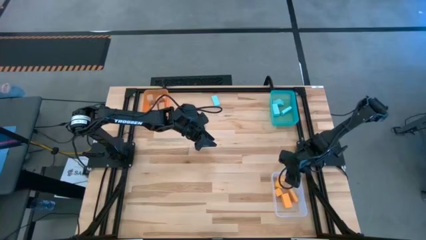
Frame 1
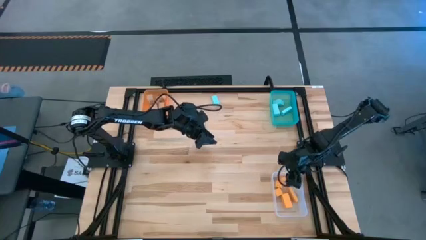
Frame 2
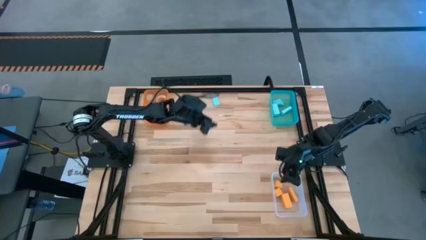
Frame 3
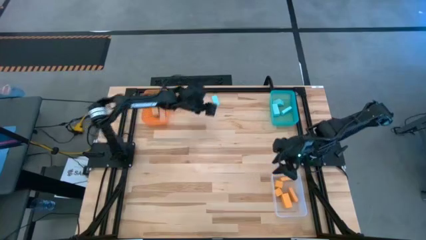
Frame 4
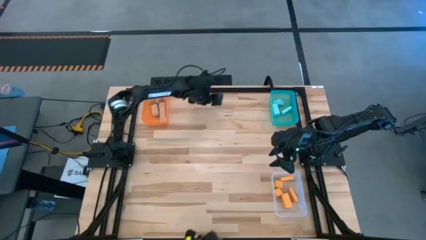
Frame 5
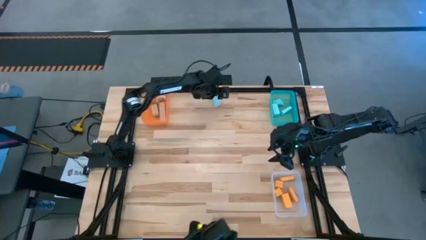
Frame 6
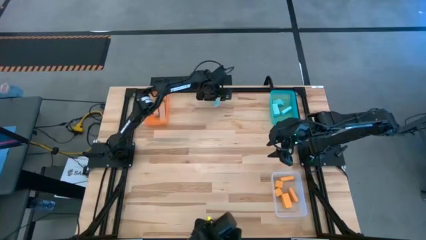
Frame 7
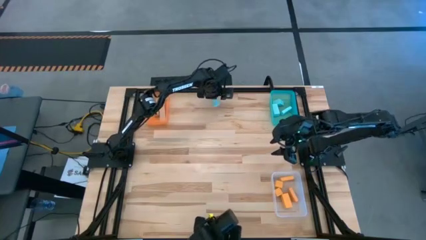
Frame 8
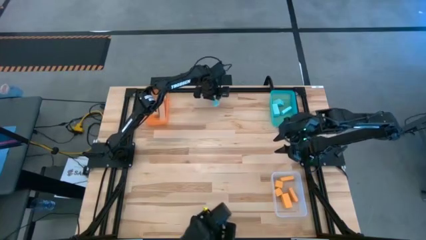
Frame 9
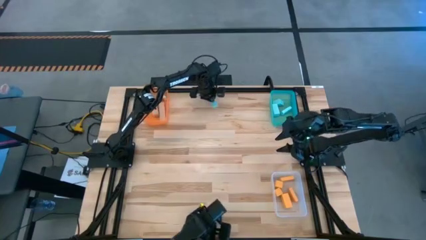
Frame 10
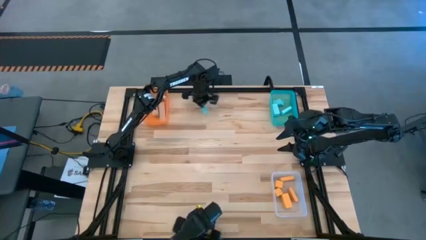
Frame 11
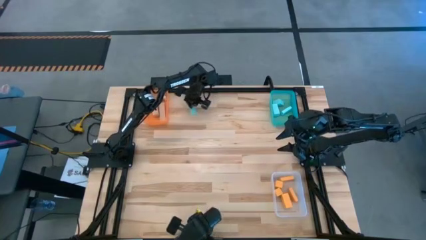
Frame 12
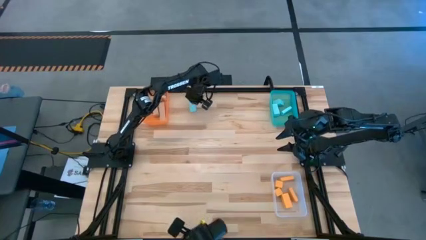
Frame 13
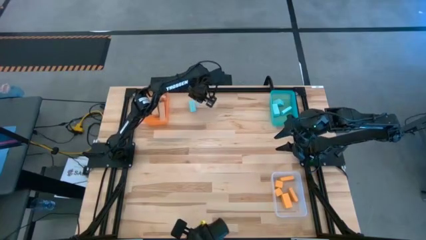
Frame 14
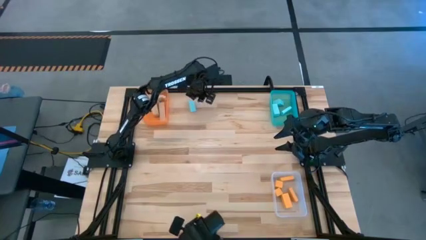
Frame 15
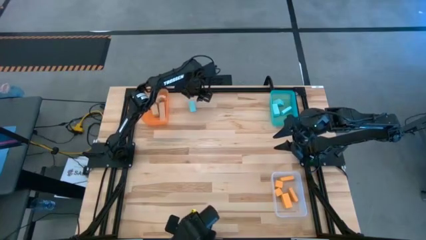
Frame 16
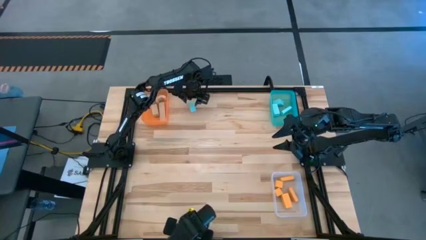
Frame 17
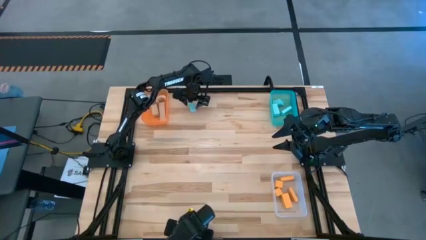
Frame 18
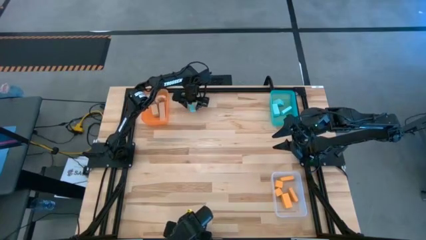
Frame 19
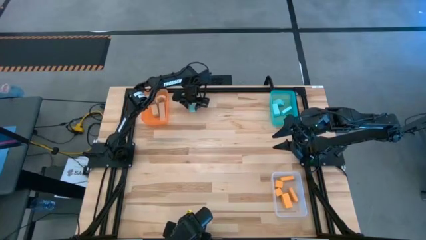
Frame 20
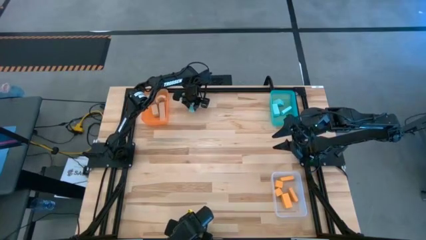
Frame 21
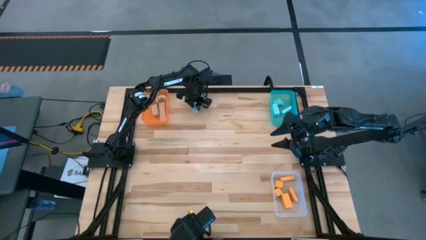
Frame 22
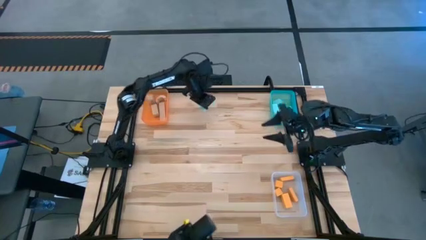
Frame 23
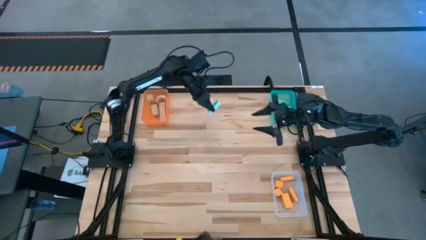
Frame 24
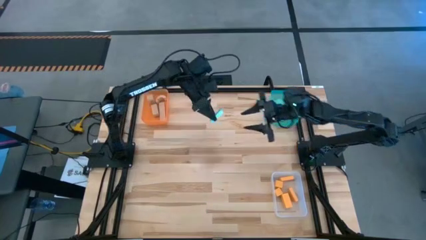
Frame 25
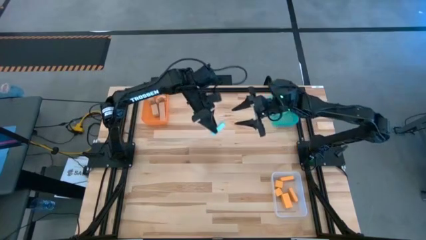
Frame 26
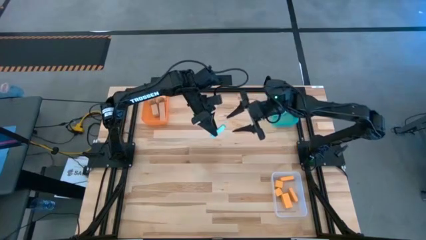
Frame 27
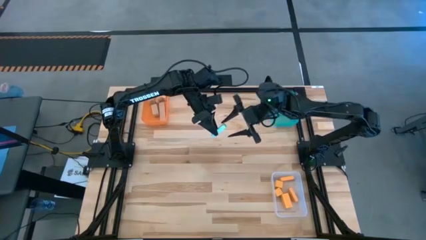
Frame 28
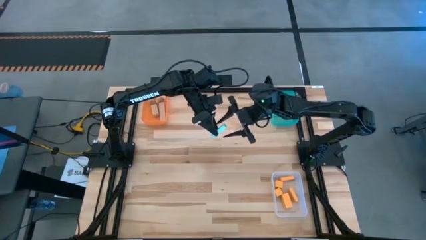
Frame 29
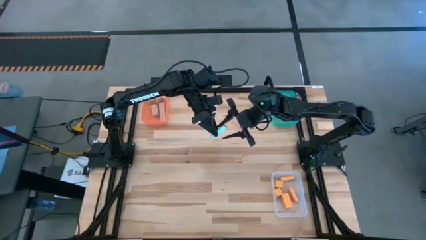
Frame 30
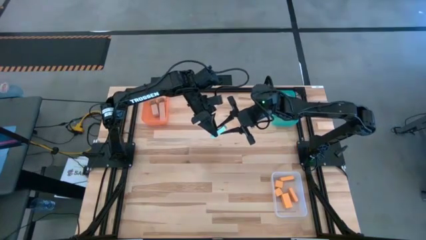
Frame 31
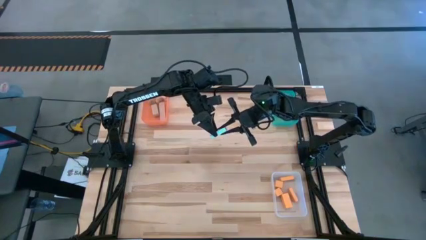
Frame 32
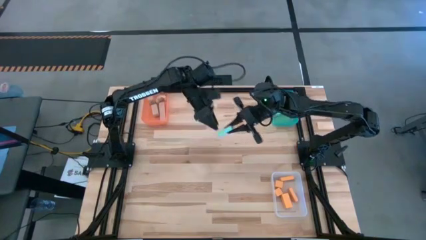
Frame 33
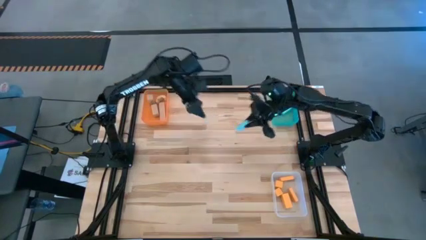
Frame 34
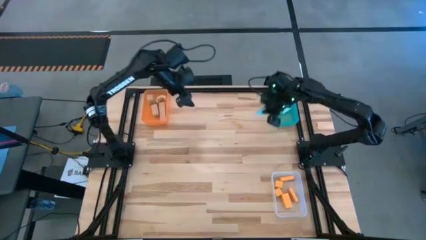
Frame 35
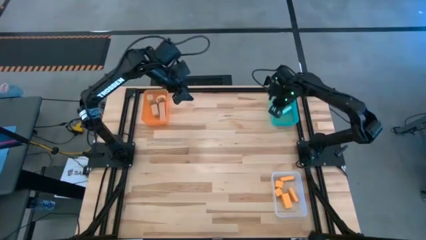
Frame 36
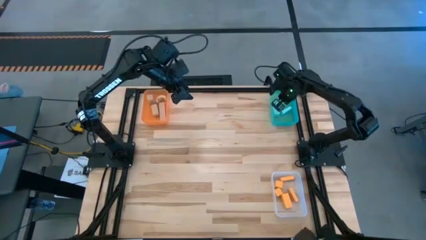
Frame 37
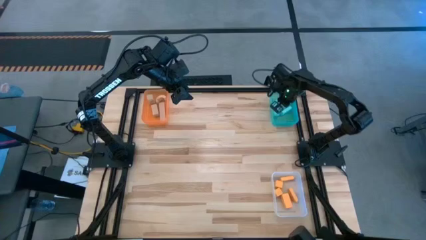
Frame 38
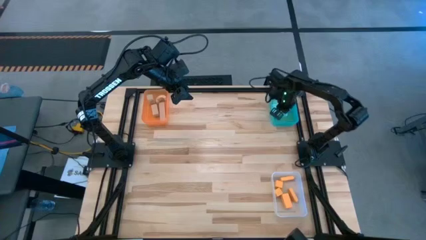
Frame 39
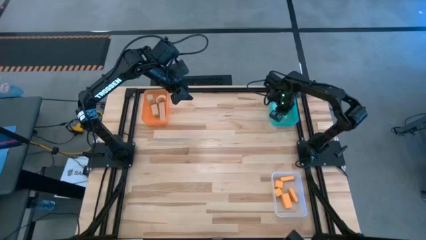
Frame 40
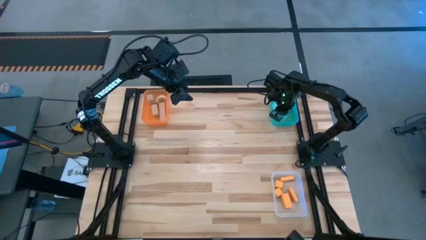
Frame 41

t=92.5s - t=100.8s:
Task: Sort & place blocks by color
Put the blue block into the blue bin

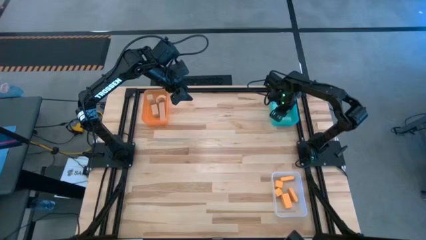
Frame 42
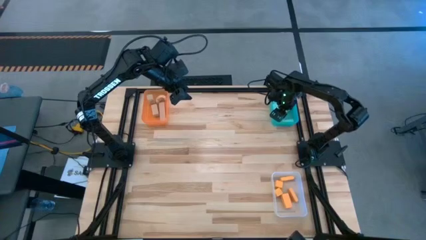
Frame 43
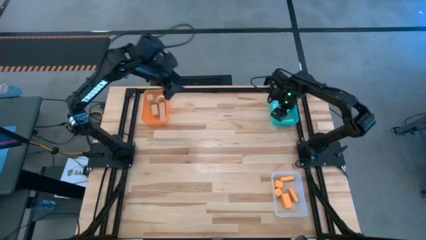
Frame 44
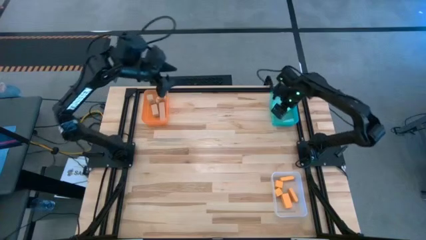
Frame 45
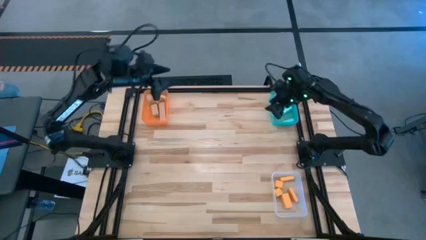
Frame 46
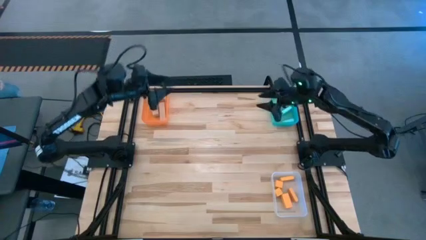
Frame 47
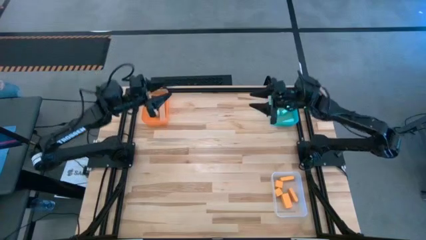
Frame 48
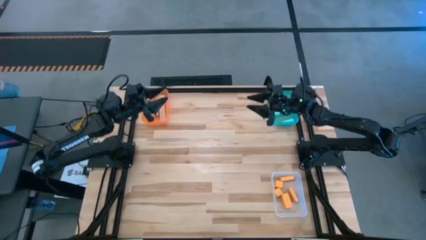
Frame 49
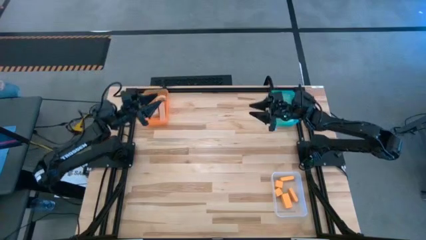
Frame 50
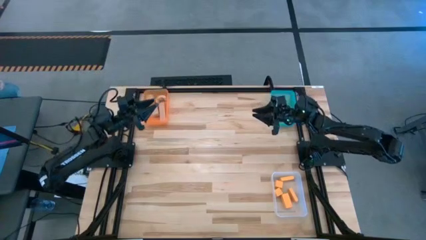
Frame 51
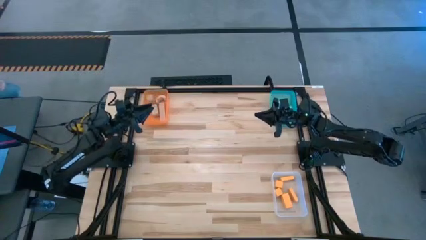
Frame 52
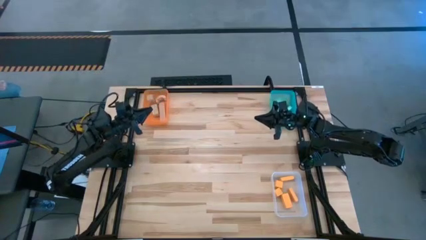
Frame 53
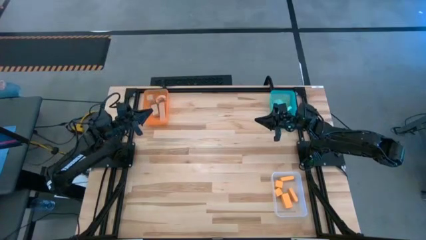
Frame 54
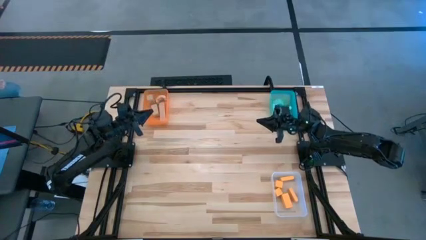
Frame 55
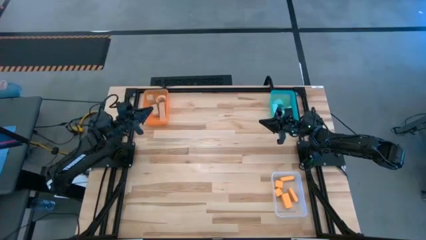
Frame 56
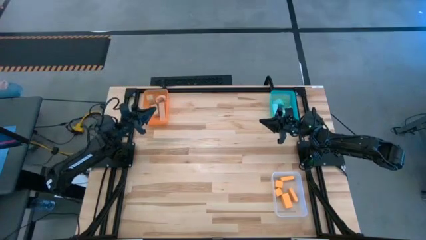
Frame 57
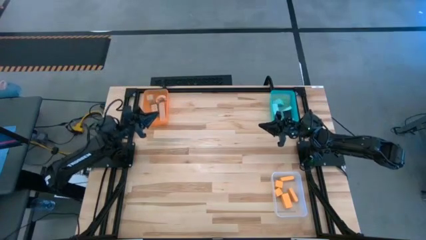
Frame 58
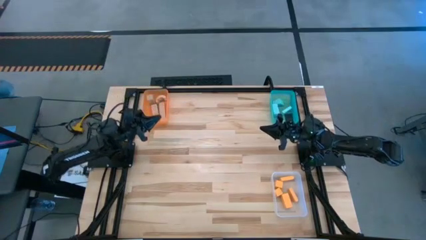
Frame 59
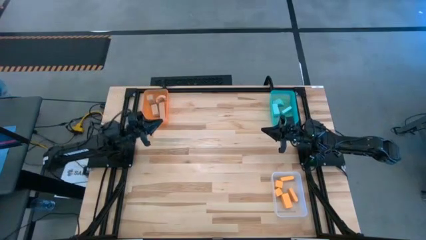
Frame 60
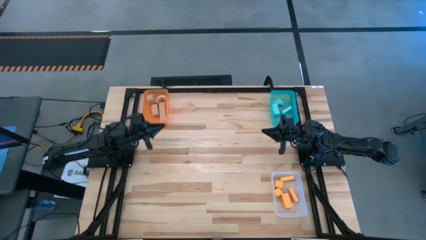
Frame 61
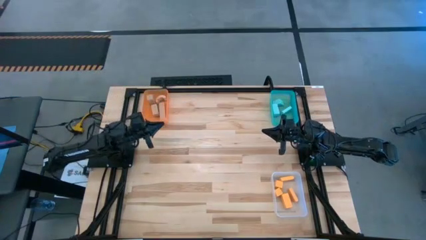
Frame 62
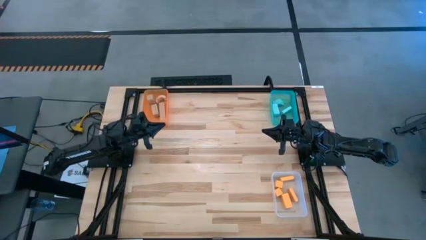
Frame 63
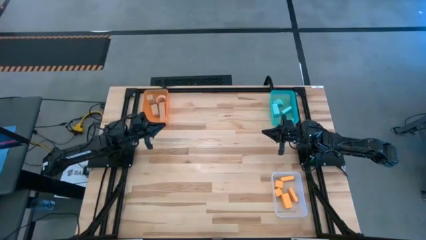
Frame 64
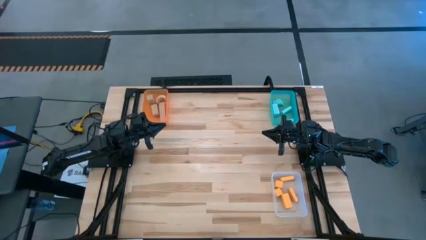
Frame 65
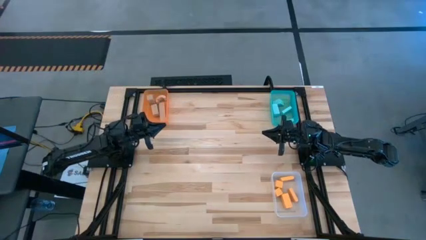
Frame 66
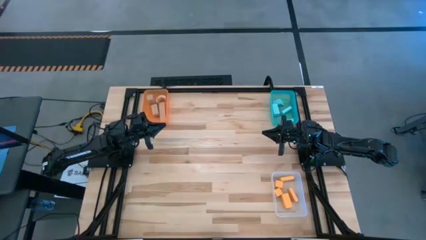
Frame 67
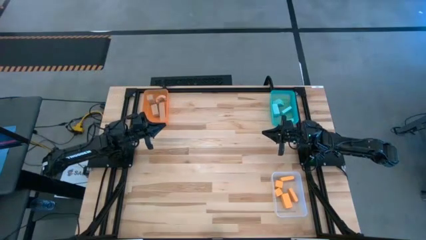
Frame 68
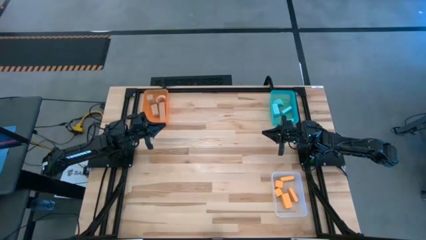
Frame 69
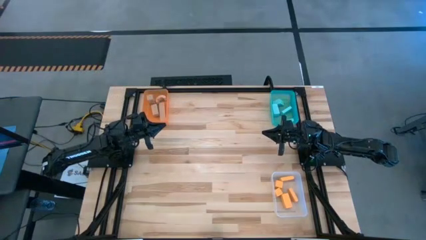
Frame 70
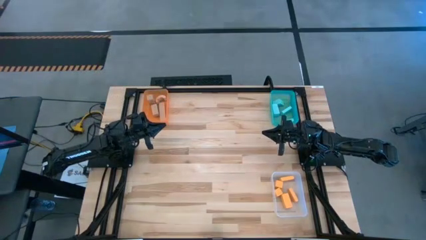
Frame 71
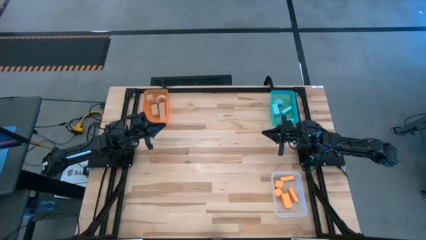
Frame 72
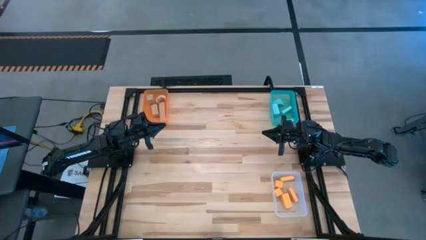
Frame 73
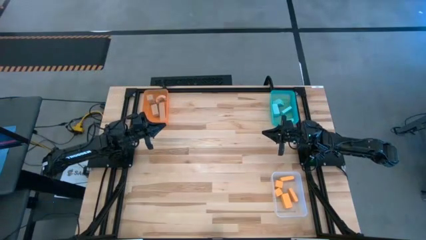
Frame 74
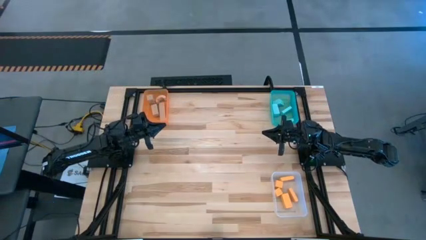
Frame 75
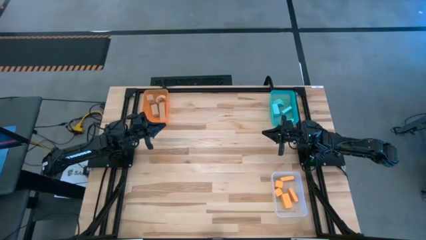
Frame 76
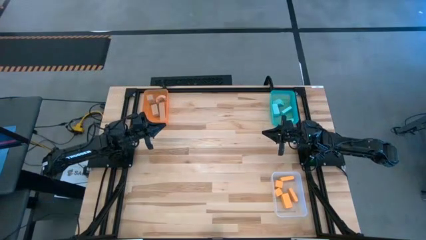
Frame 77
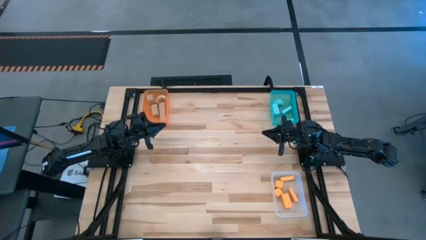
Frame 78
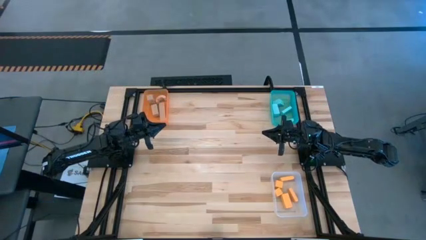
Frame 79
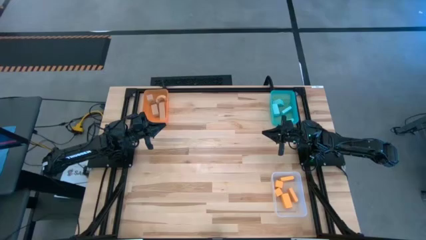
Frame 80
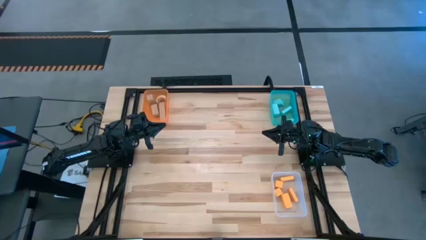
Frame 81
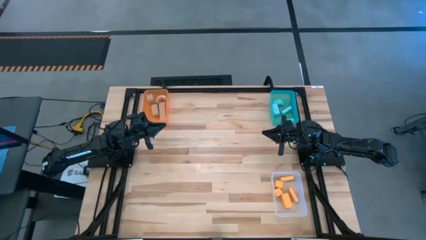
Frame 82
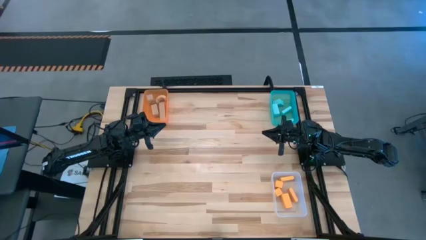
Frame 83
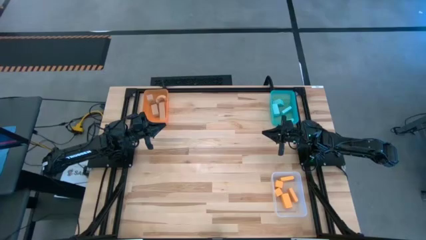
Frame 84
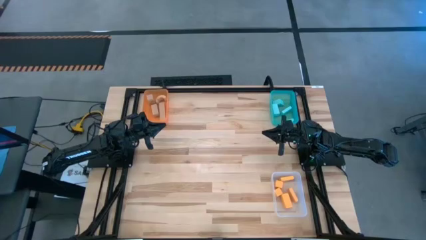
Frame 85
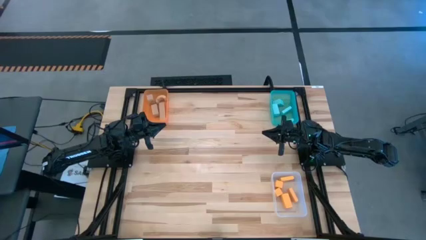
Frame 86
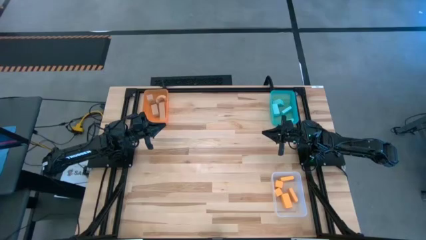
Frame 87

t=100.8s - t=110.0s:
Return to Home Position
